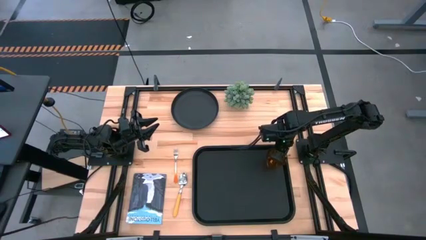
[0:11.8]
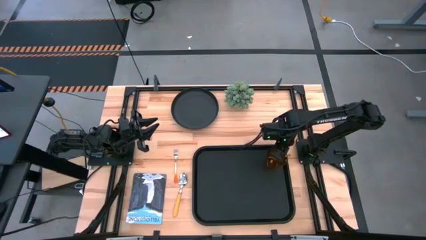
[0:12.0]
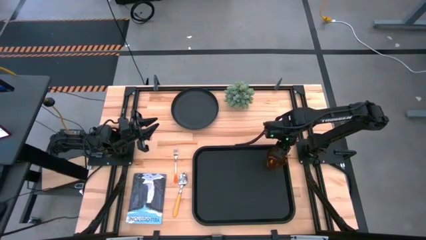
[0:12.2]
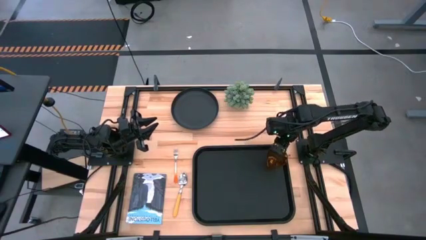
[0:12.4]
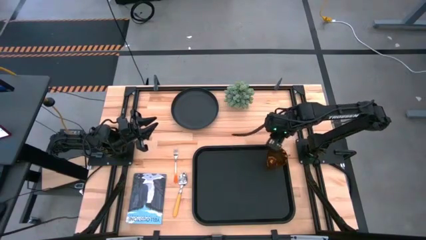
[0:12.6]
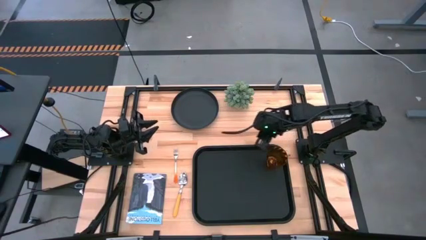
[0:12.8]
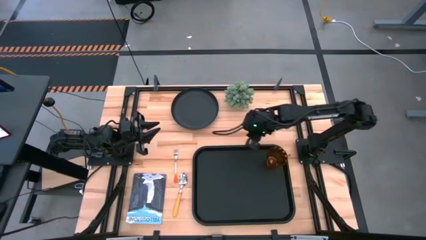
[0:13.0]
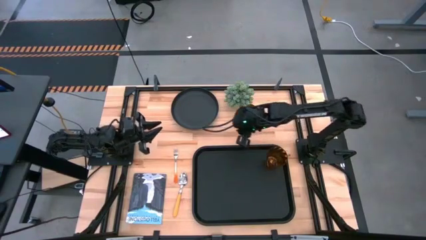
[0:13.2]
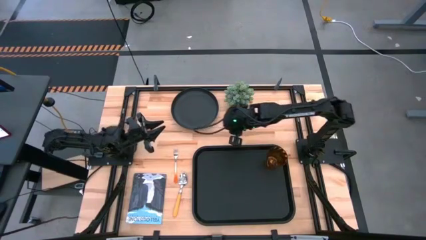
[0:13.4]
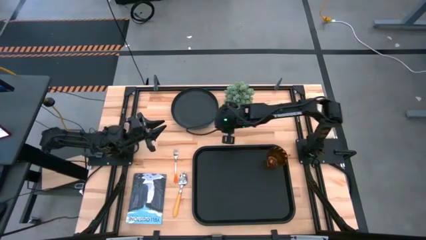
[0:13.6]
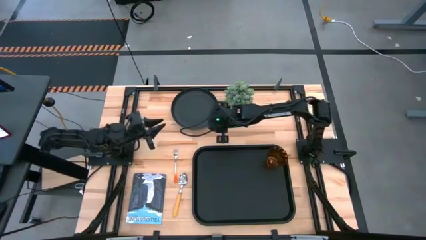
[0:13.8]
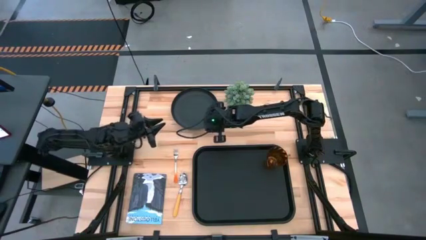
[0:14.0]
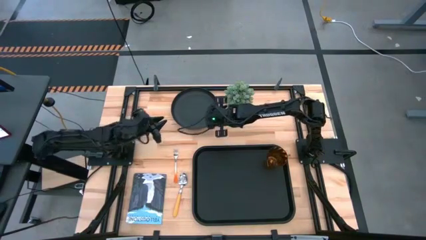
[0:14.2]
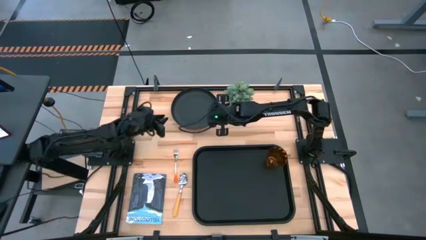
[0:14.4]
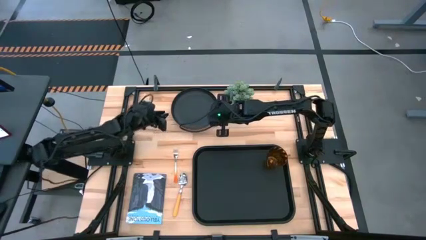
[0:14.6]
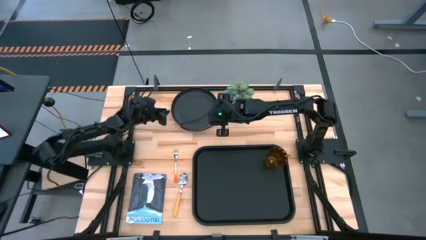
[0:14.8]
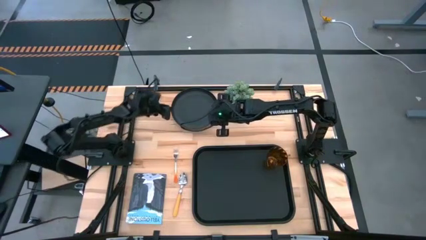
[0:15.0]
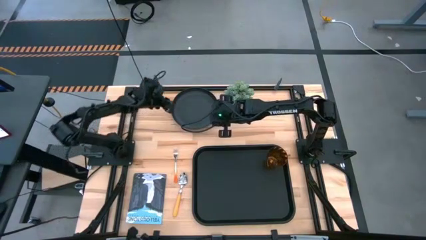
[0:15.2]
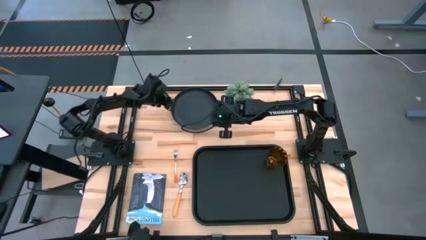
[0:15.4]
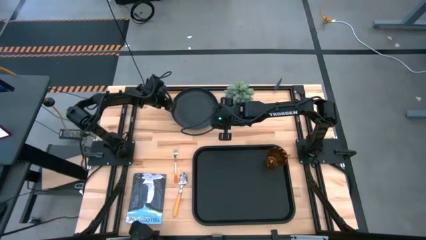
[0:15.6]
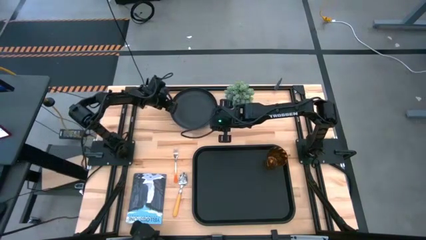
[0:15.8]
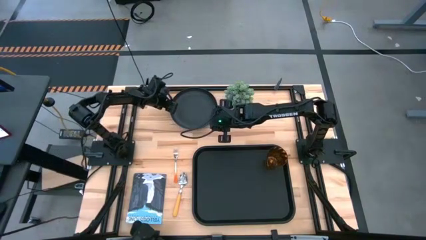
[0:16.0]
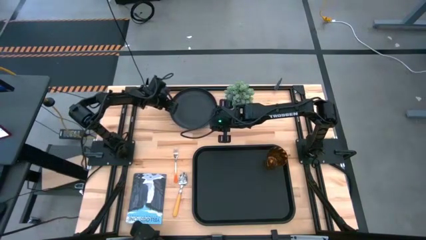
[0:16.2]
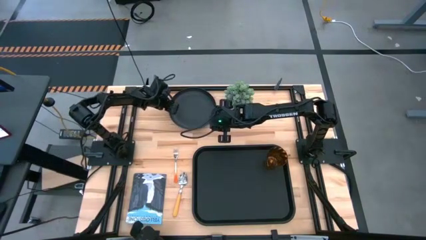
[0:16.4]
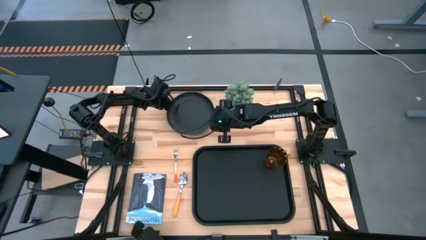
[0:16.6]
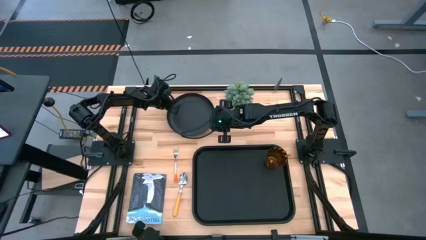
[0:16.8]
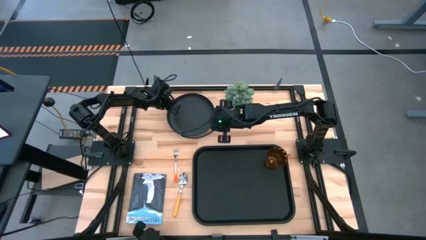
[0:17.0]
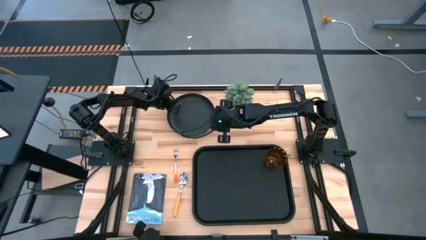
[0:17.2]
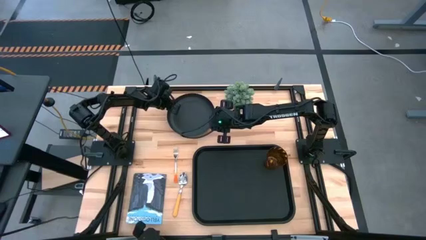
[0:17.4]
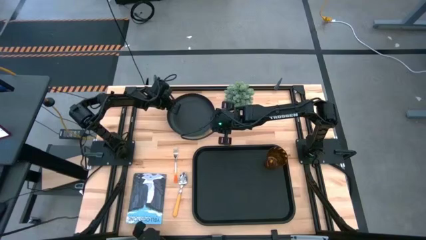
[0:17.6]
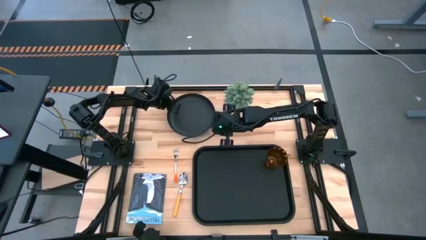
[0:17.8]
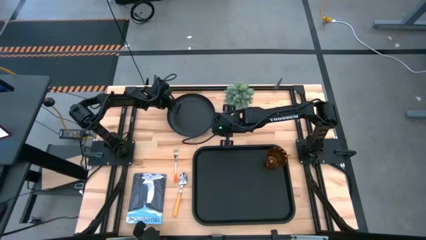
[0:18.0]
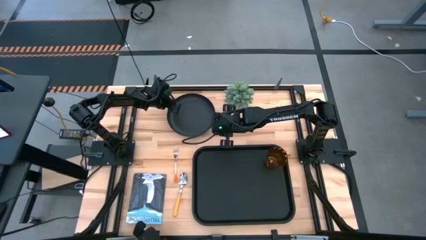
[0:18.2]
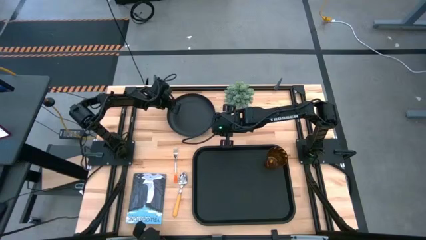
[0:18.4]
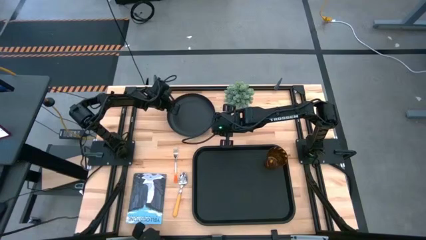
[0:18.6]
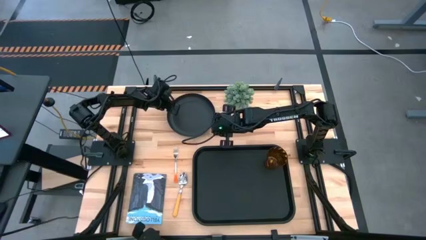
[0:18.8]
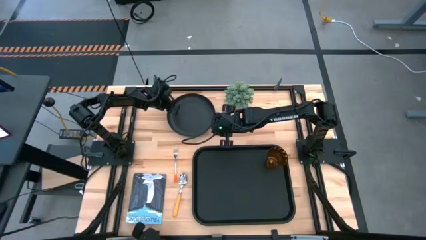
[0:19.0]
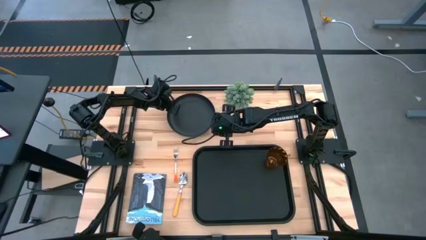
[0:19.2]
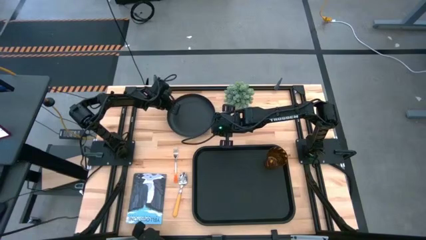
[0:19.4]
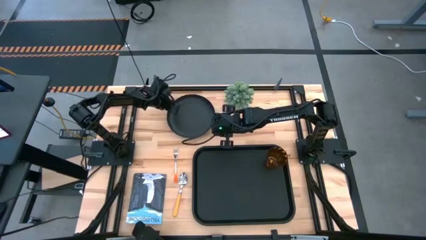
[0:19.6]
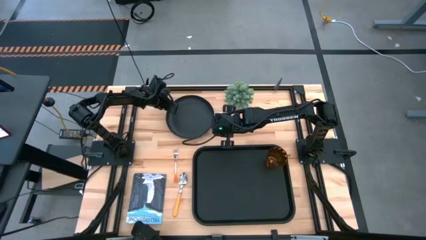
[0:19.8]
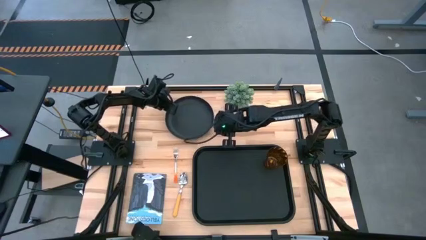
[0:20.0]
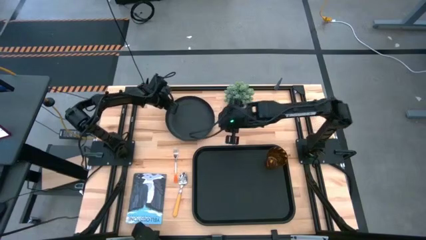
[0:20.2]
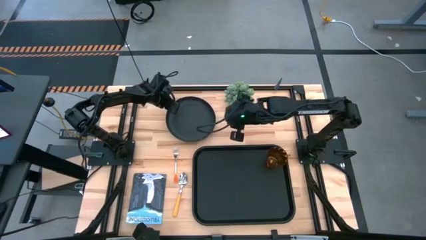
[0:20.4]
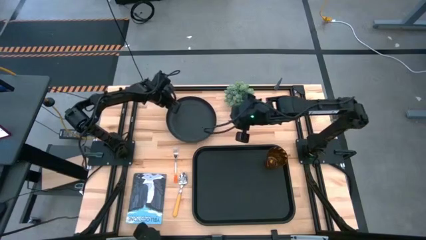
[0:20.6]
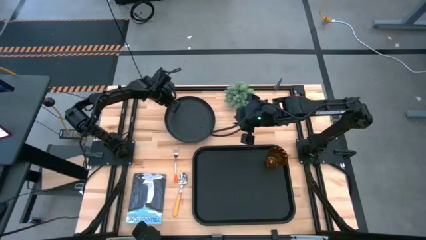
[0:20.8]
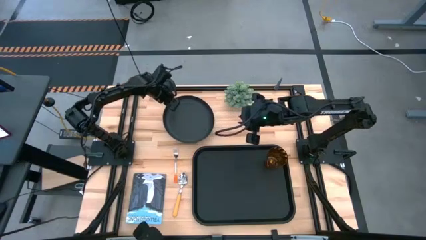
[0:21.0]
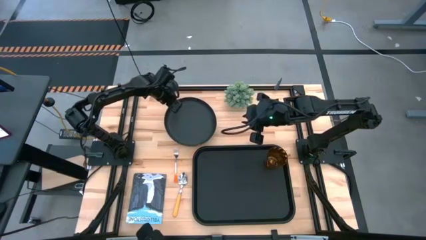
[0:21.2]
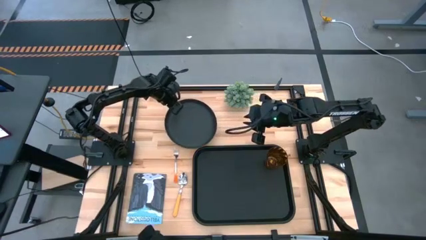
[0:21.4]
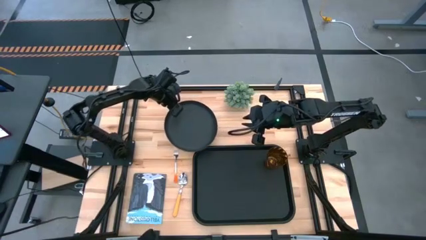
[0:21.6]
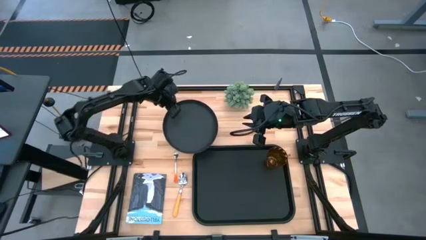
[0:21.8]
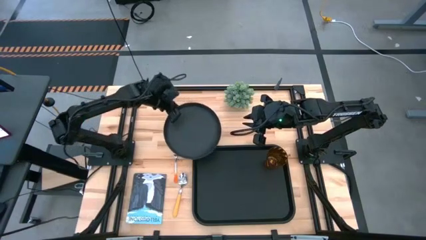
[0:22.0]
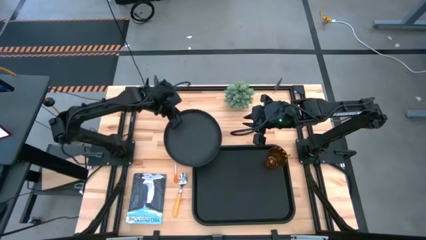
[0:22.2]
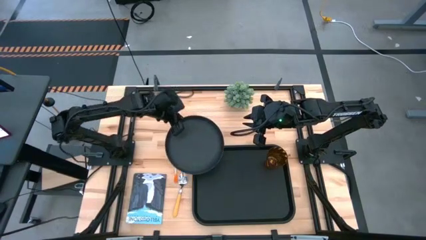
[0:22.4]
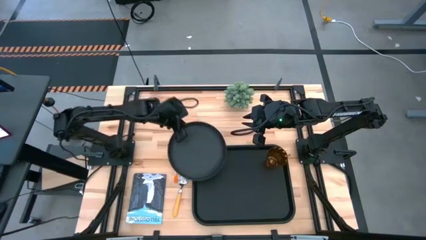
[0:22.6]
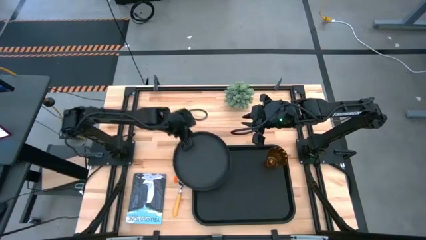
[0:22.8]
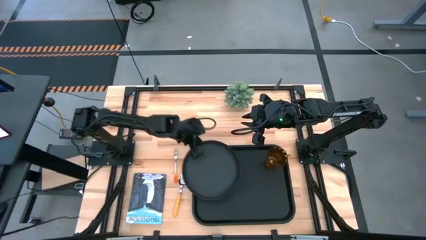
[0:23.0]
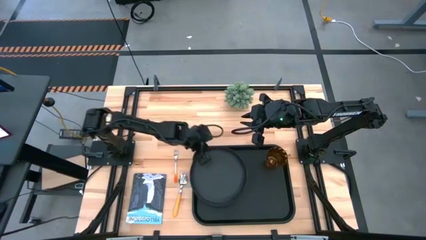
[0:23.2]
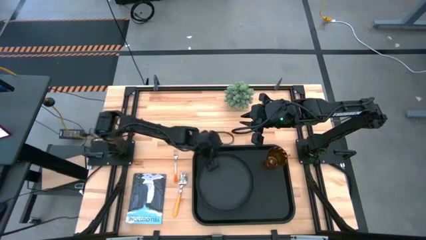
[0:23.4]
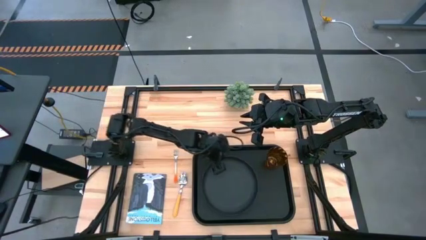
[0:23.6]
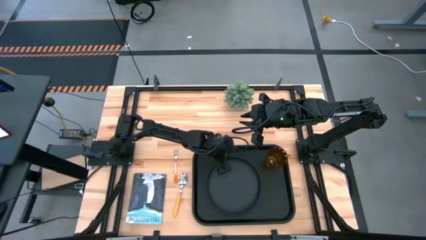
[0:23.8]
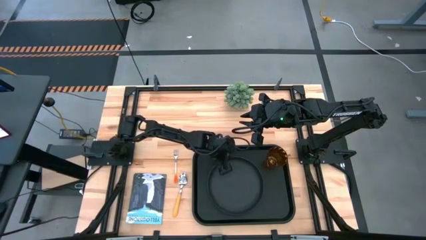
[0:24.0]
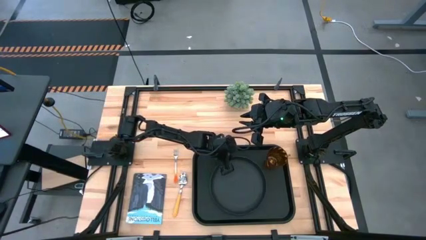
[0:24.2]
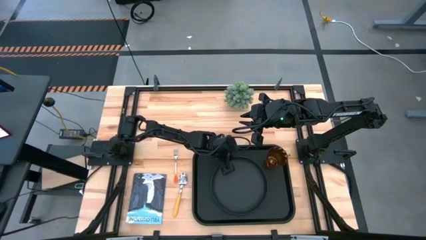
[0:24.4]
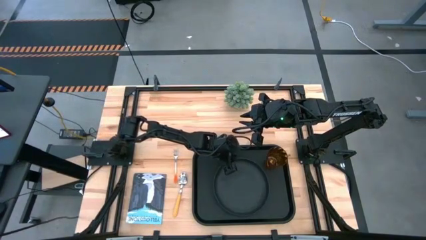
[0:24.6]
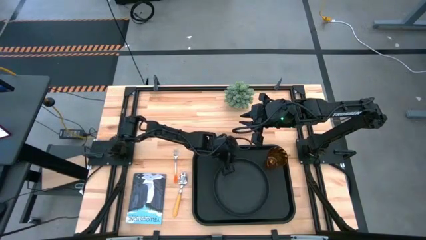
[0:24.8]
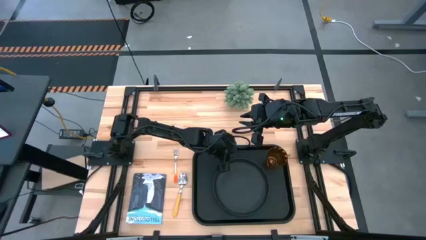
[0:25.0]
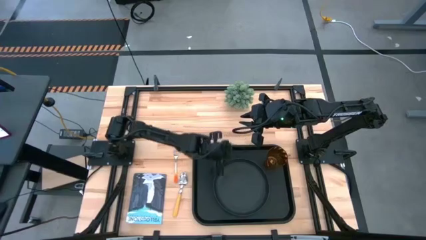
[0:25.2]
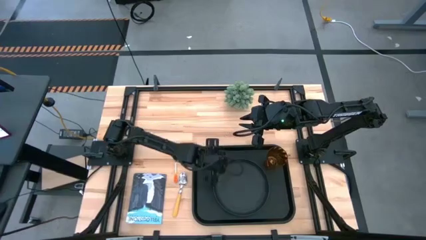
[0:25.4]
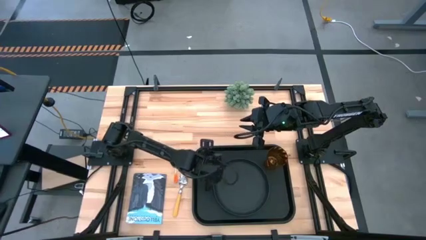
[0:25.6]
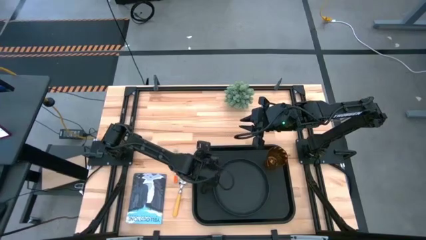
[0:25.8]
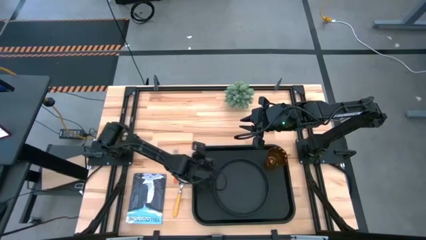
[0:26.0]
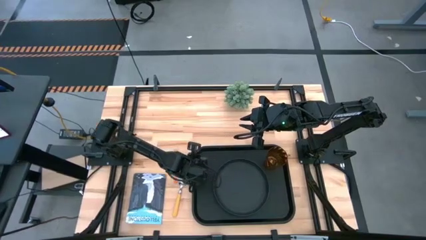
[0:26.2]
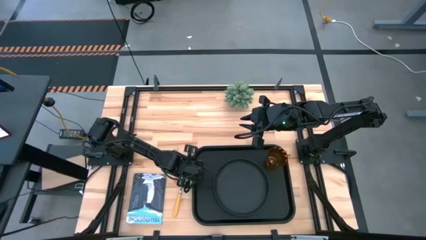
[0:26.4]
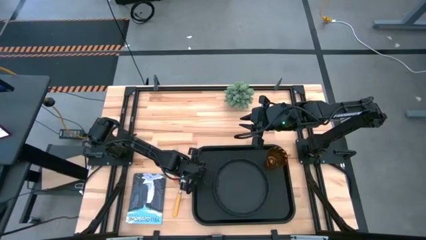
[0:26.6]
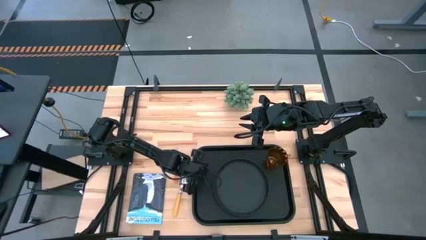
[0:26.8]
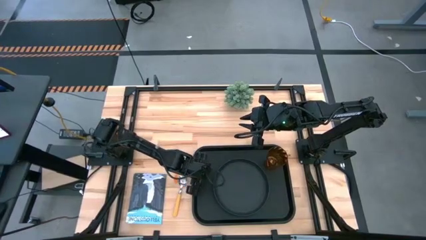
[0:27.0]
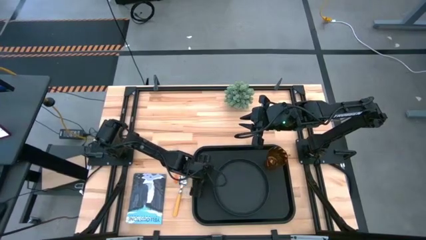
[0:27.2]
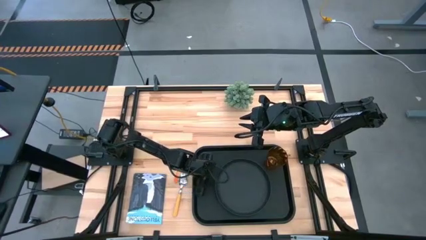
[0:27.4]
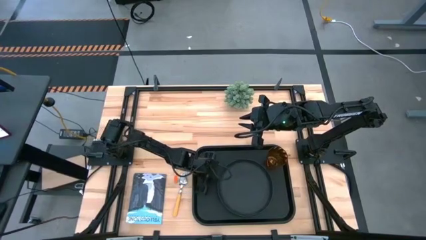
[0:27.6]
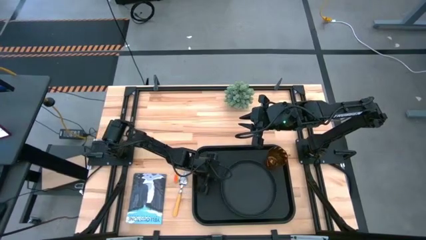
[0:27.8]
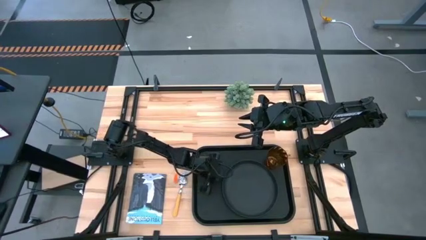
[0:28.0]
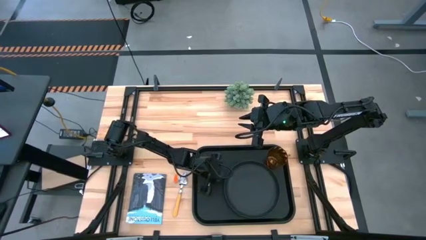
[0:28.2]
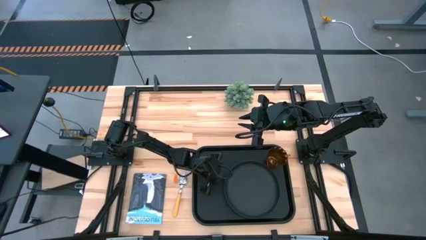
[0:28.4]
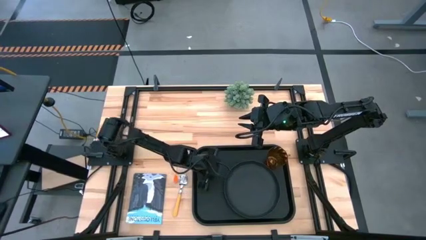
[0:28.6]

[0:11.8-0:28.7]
Task: Pick and place plate/cup/fork/spoon on tray
Put the black plate on the black tray to the bottom left of the orange cup
